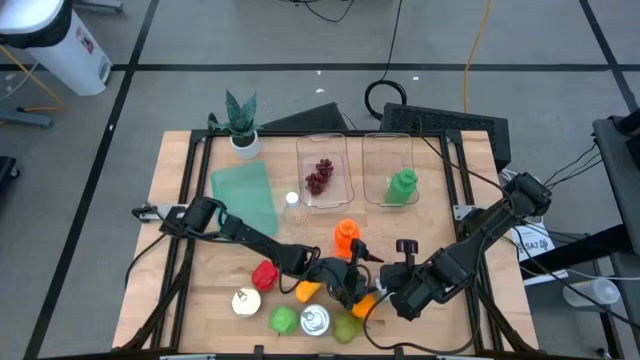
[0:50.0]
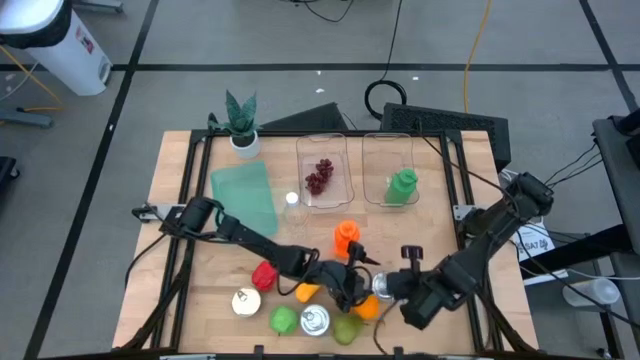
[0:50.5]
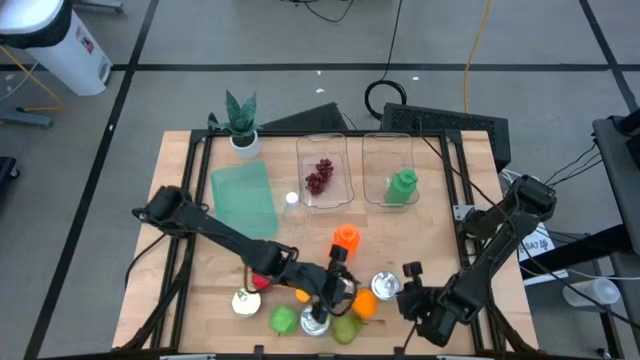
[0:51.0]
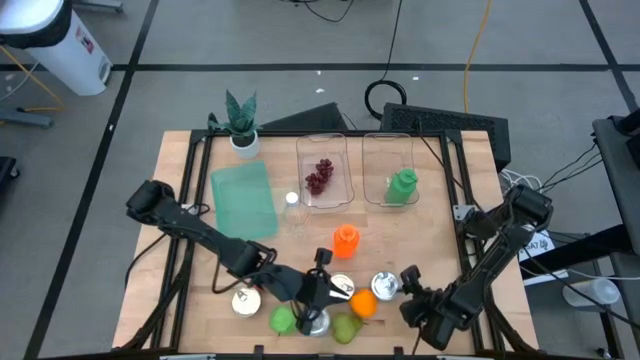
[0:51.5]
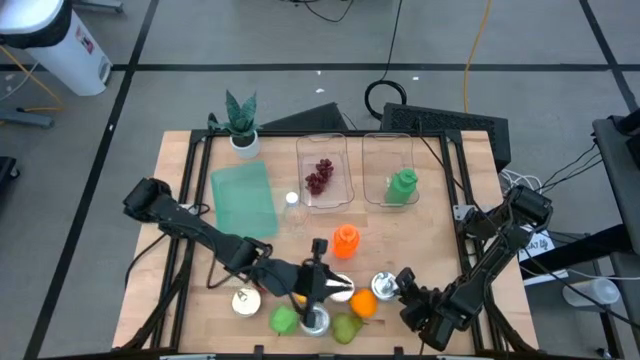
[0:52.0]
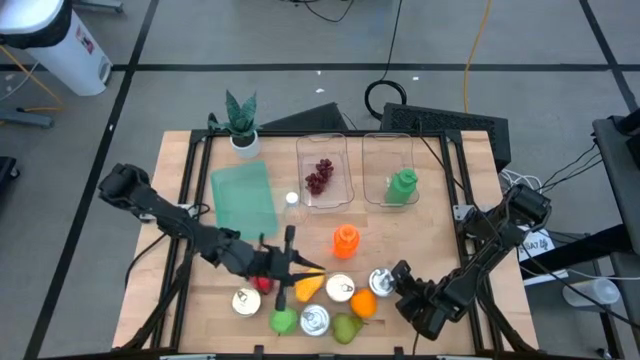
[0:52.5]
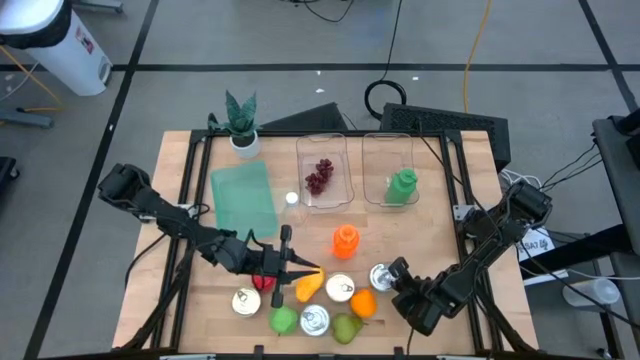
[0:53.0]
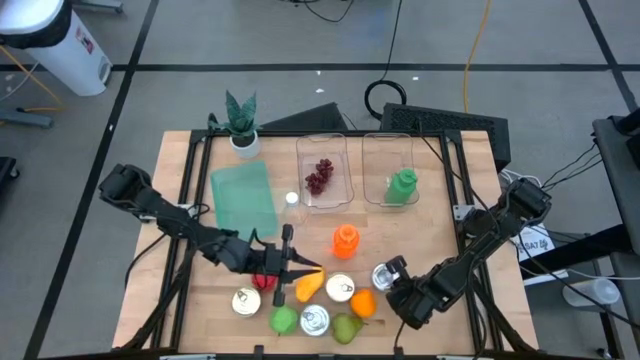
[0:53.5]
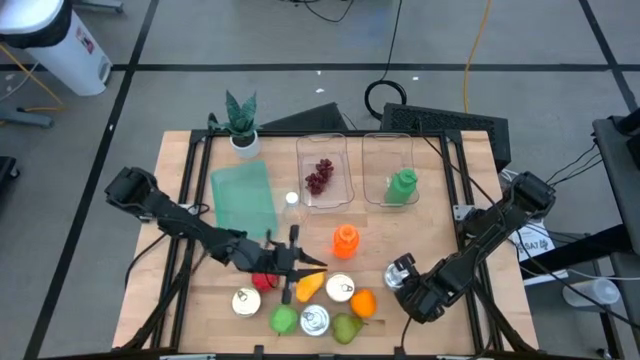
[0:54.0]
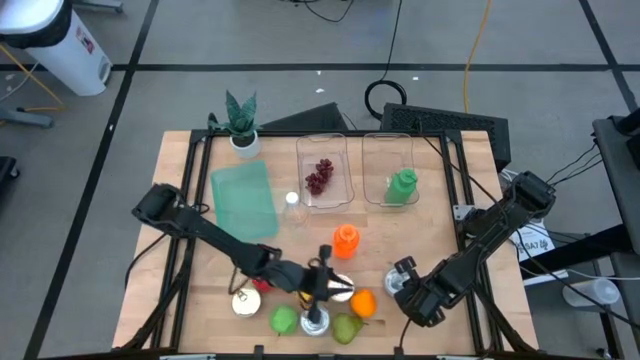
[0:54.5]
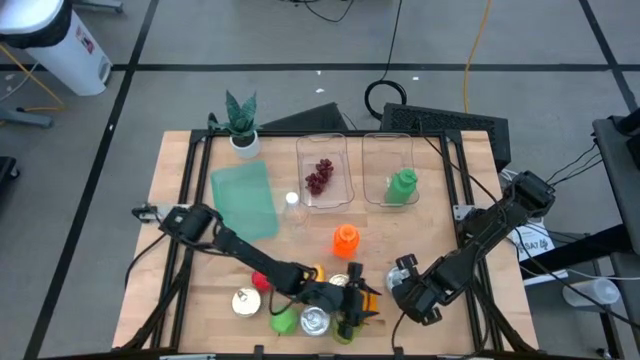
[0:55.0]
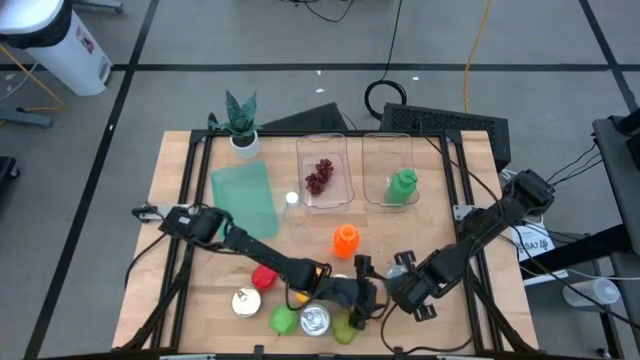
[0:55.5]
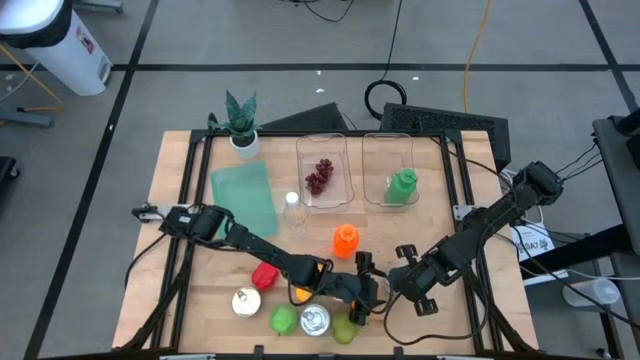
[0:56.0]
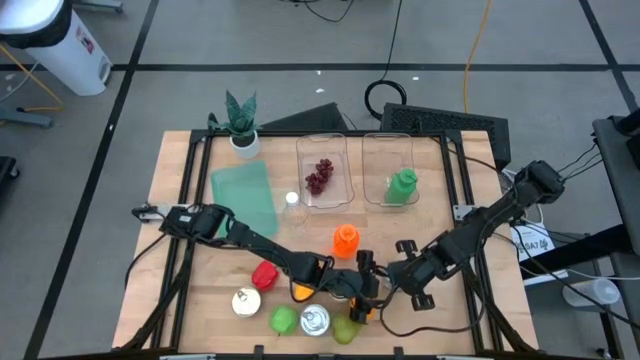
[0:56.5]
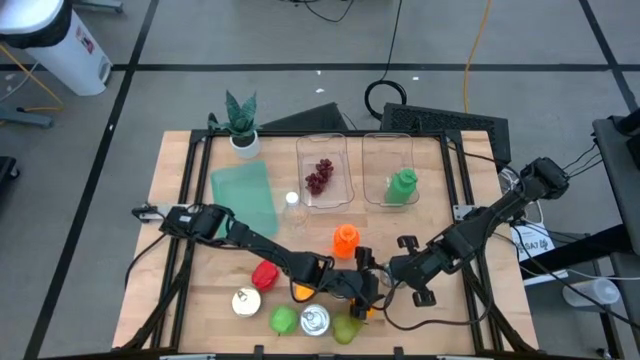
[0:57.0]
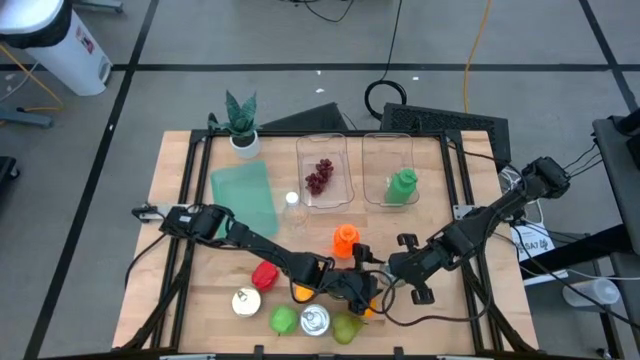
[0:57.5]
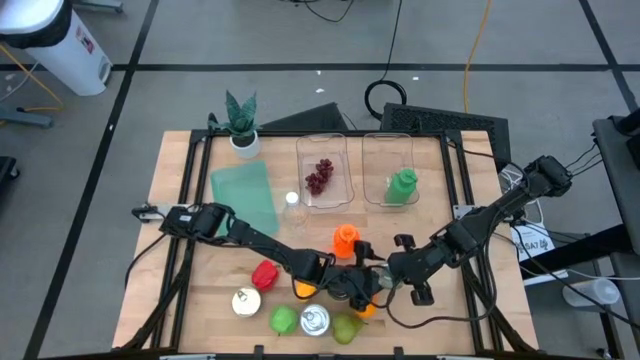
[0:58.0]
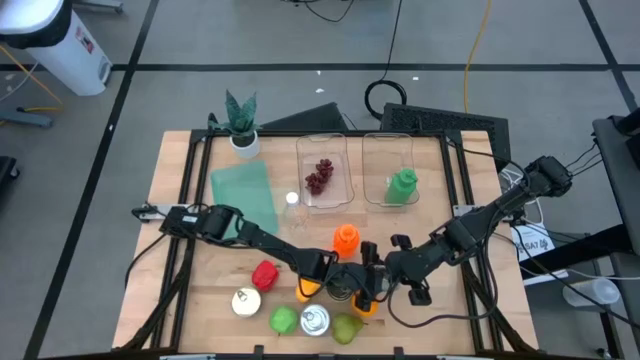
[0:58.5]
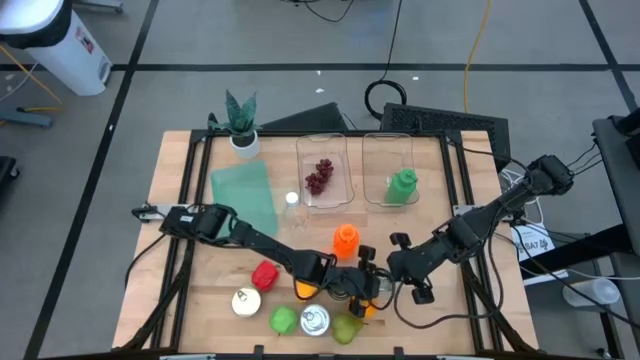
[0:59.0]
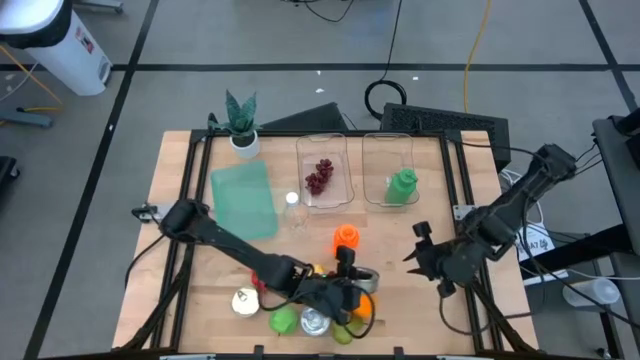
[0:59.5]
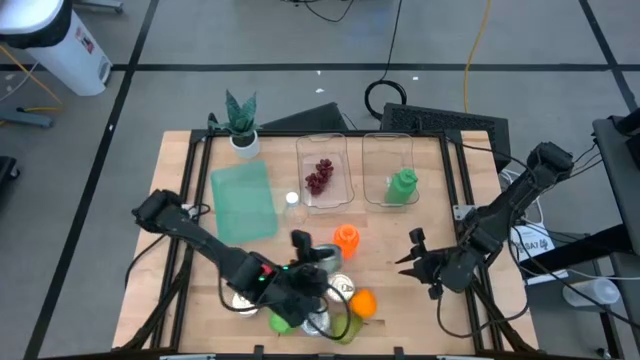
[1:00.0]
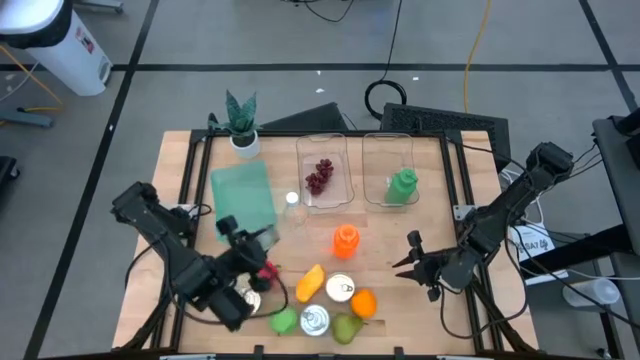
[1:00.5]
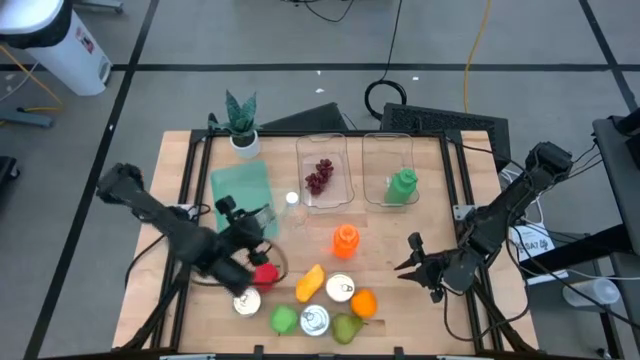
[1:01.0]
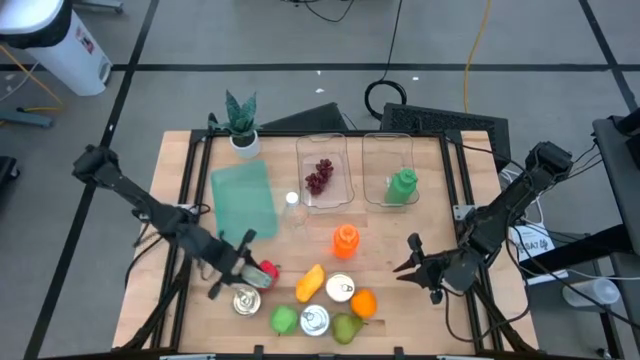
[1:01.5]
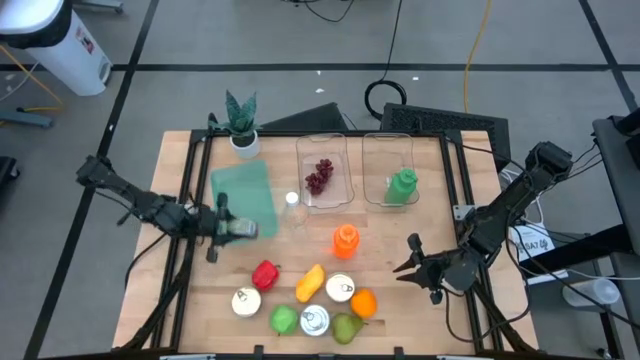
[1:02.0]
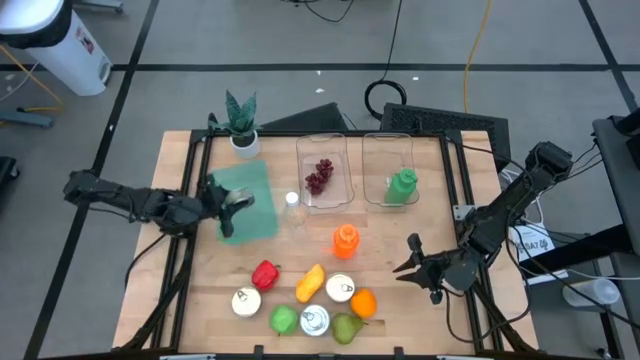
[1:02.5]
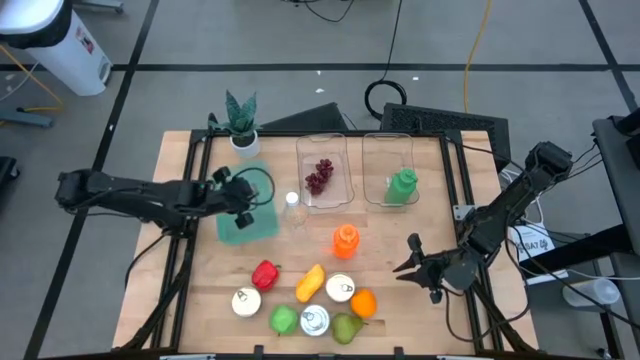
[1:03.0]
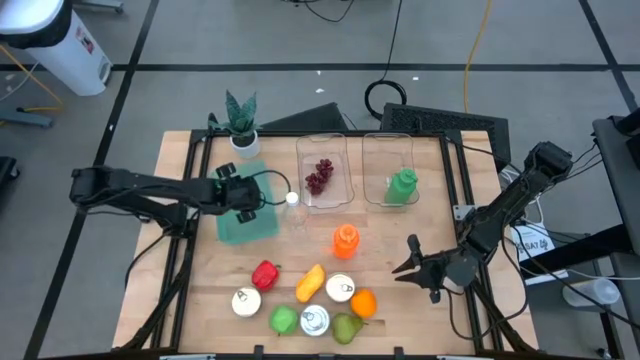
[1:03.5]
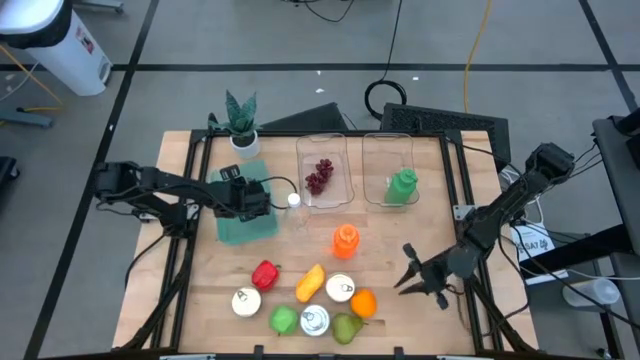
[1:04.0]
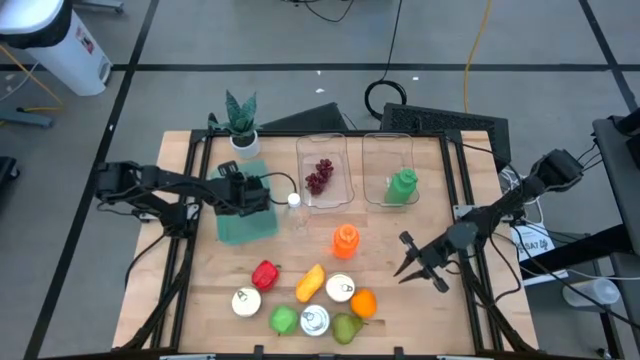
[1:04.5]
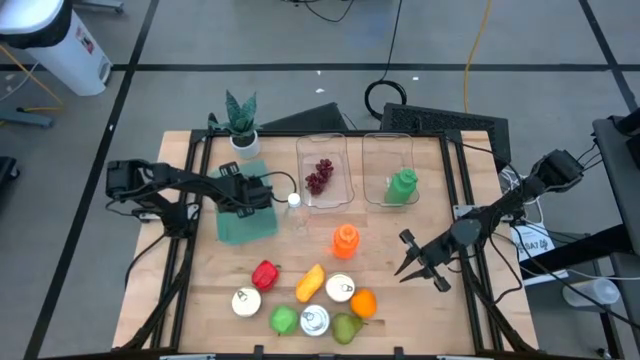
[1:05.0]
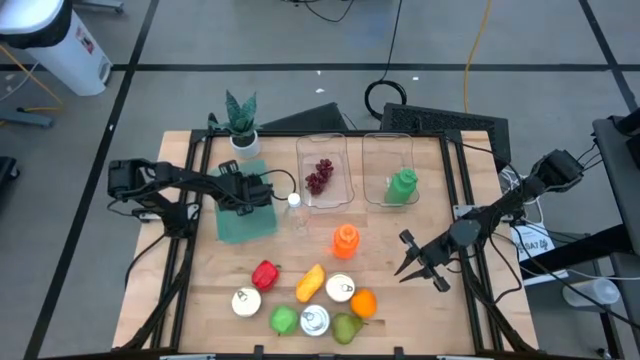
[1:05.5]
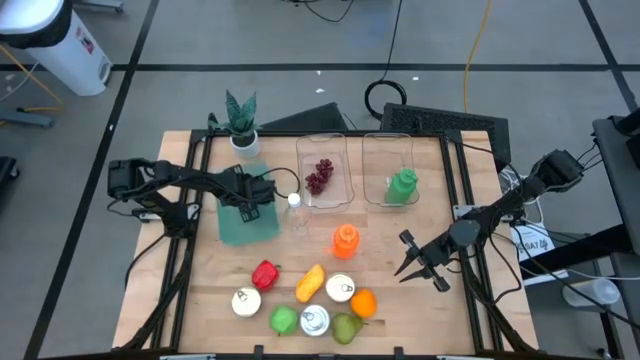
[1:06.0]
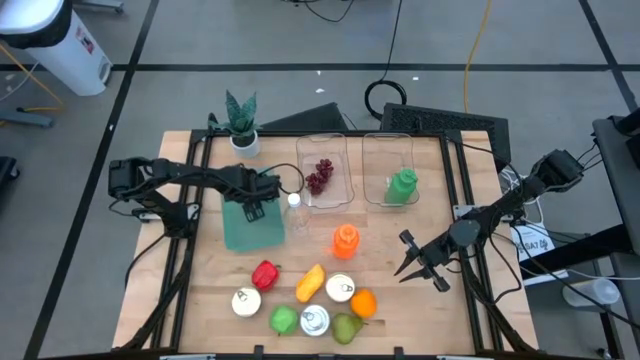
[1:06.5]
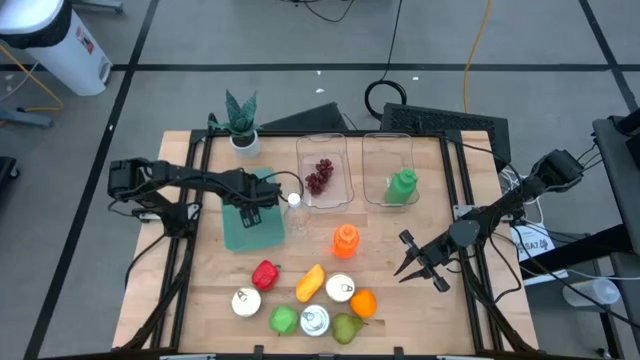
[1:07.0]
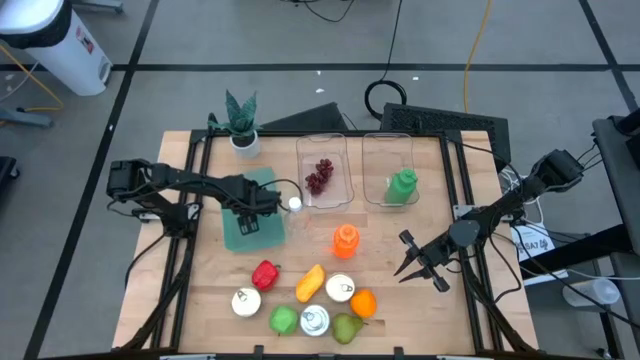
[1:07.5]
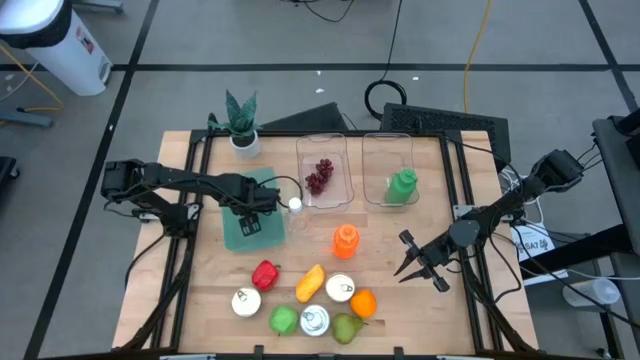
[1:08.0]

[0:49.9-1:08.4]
Task: Pick & Place Food Item
Put the right green tuna can into the blue bin

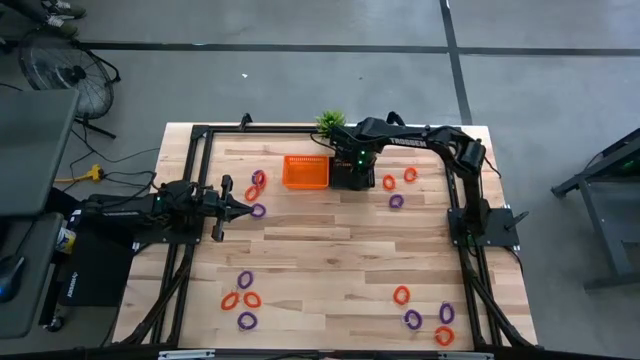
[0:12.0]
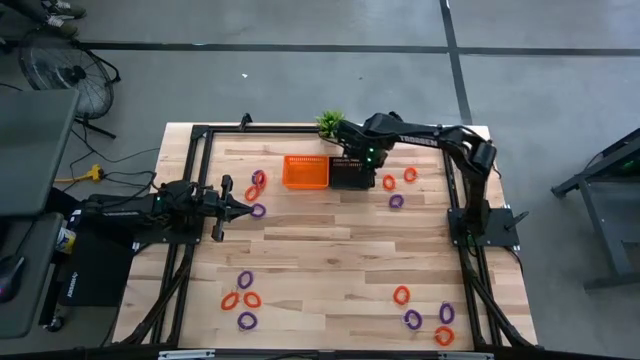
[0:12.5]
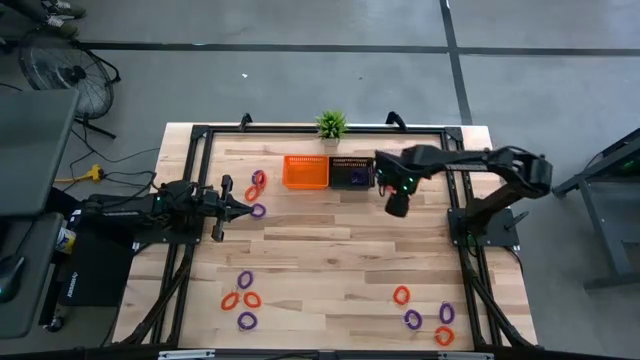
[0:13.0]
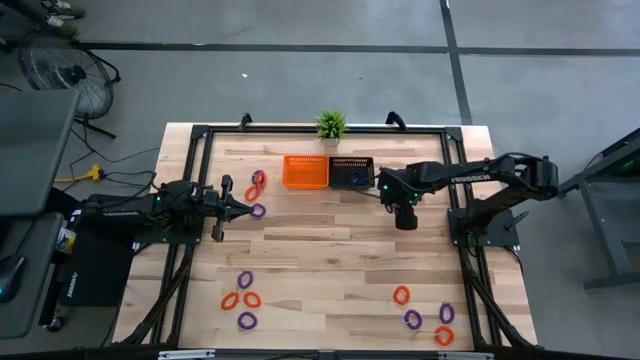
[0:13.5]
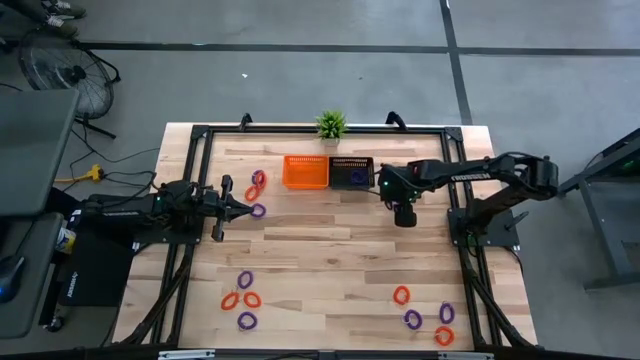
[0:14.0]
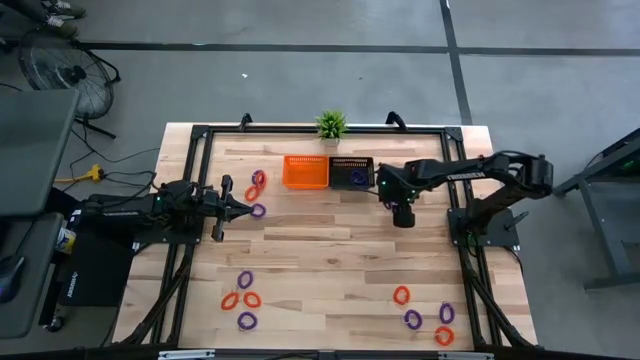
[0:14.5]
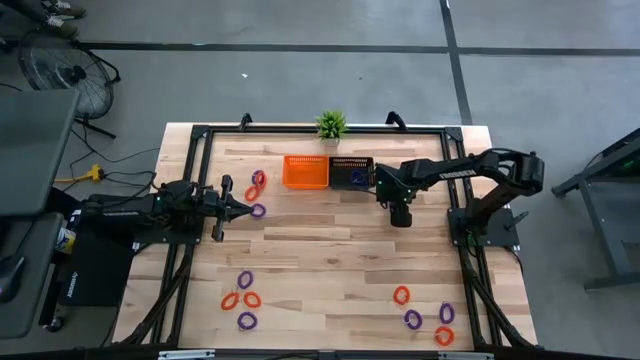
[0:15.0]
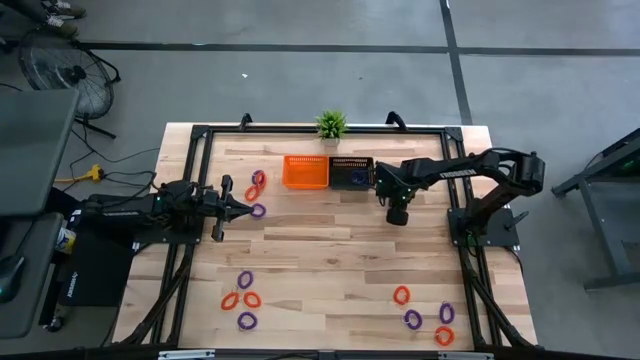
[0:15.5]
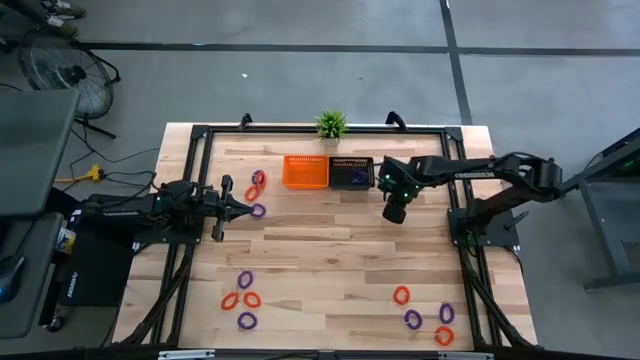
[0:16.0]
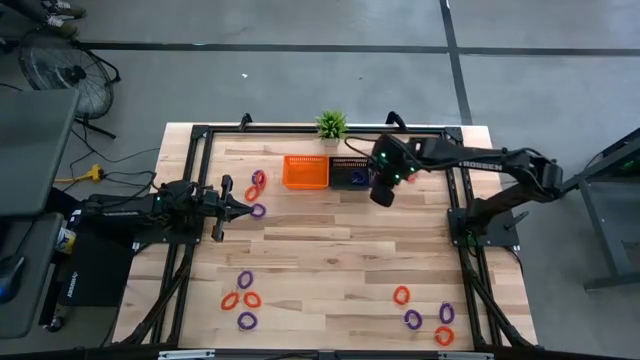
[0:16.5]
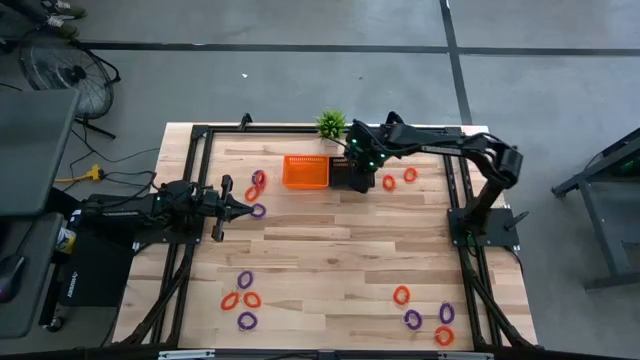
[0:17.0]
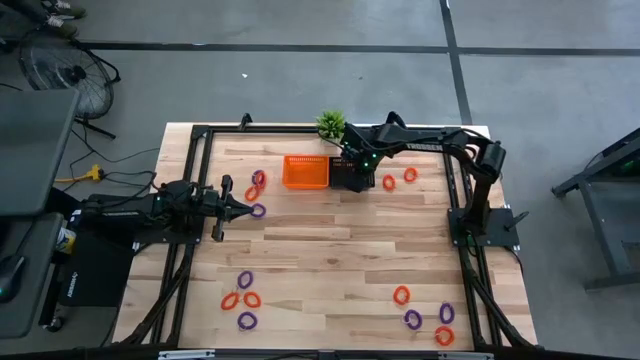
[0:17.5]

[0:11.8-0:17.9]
Task: Sort spring keychains into baskets
Put the purple spring keychain into the black basket
